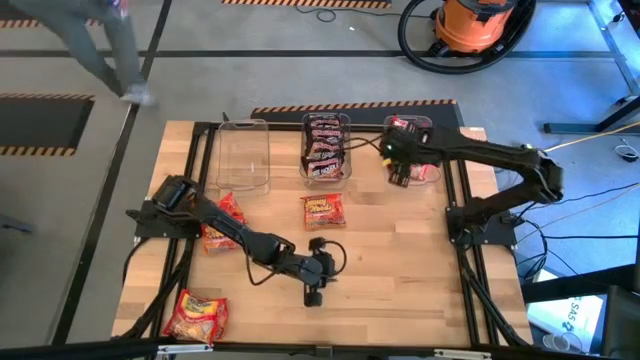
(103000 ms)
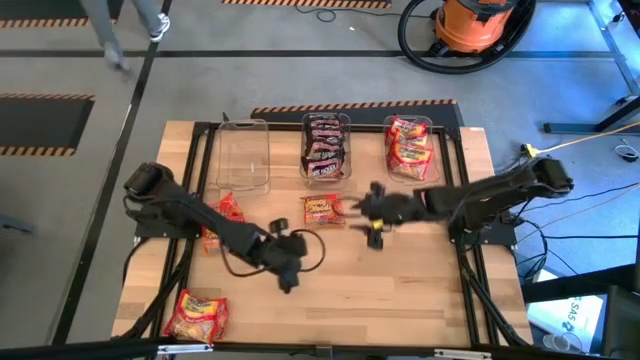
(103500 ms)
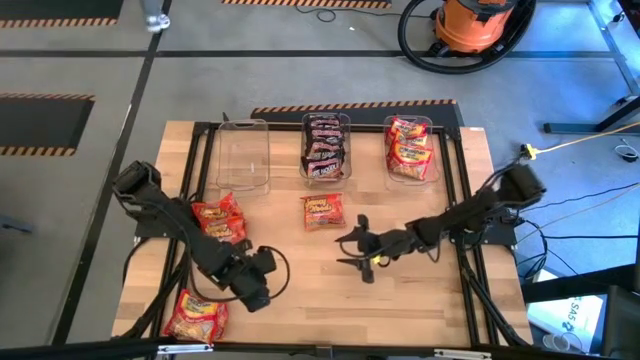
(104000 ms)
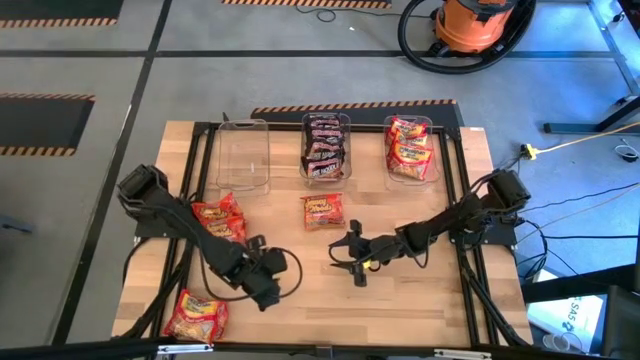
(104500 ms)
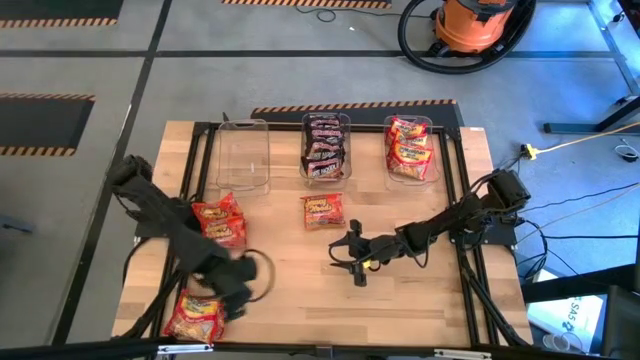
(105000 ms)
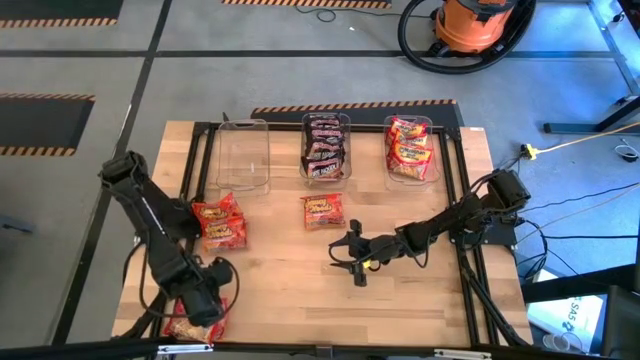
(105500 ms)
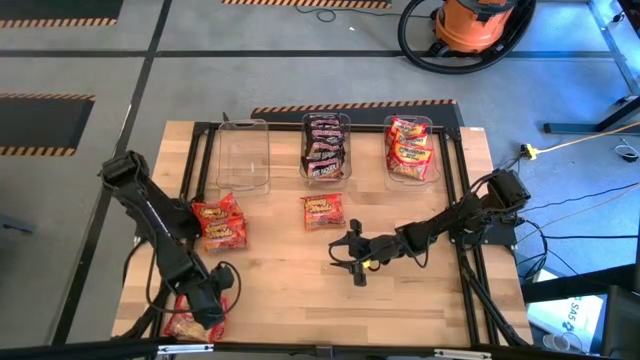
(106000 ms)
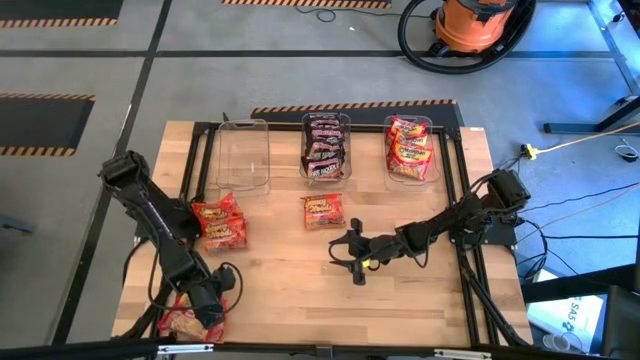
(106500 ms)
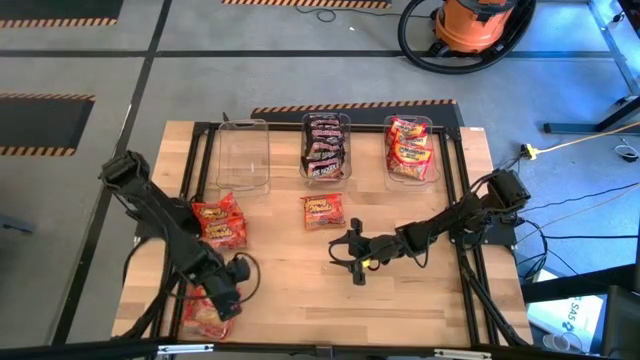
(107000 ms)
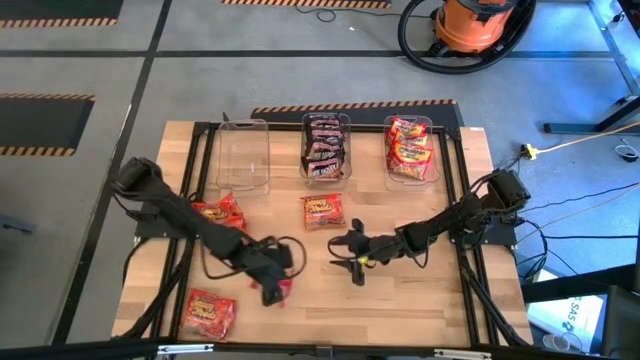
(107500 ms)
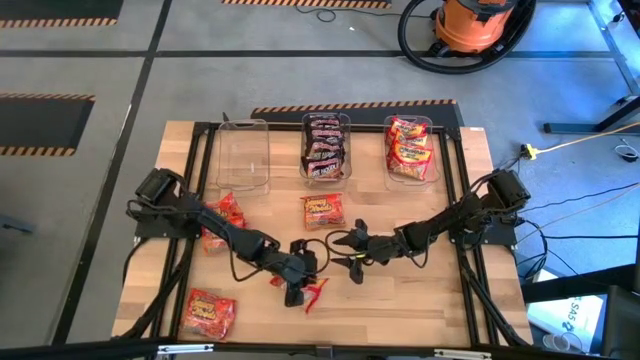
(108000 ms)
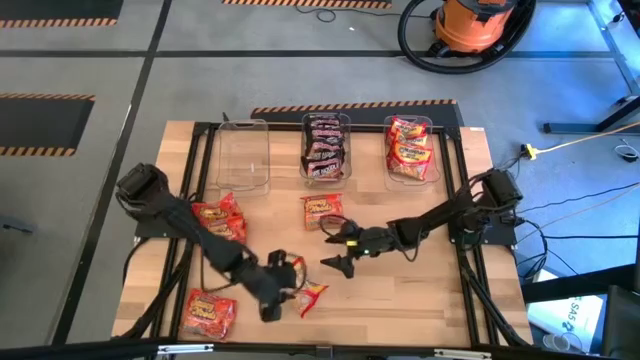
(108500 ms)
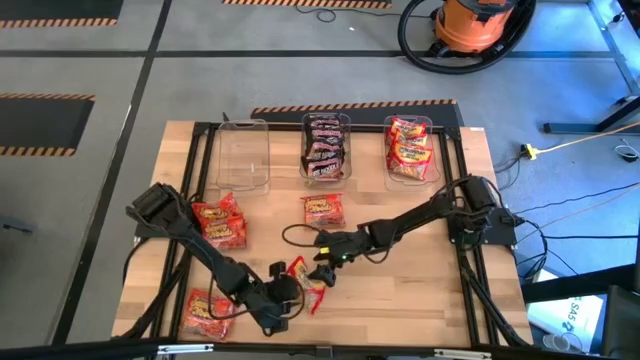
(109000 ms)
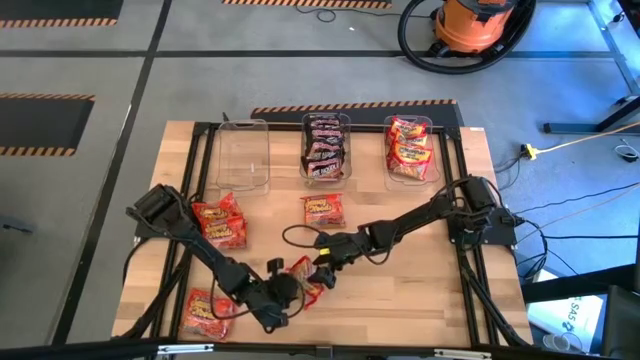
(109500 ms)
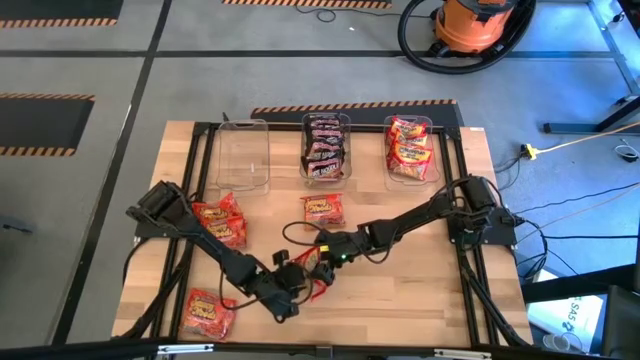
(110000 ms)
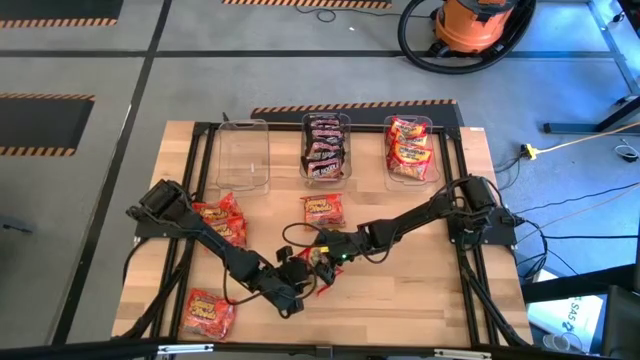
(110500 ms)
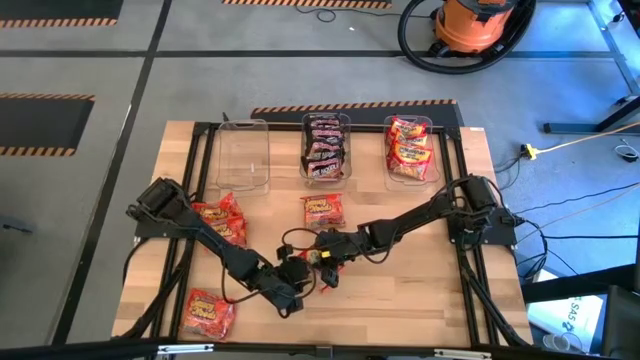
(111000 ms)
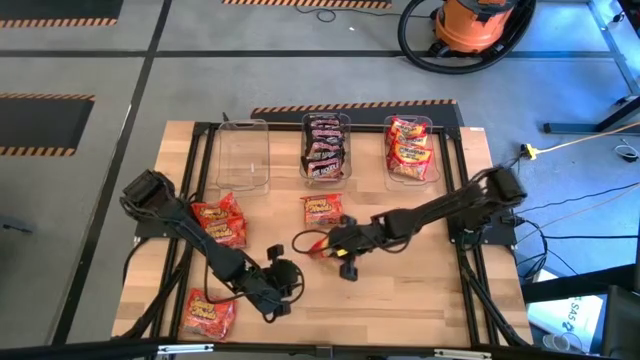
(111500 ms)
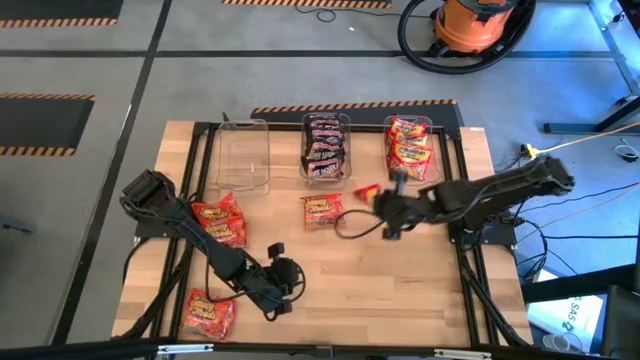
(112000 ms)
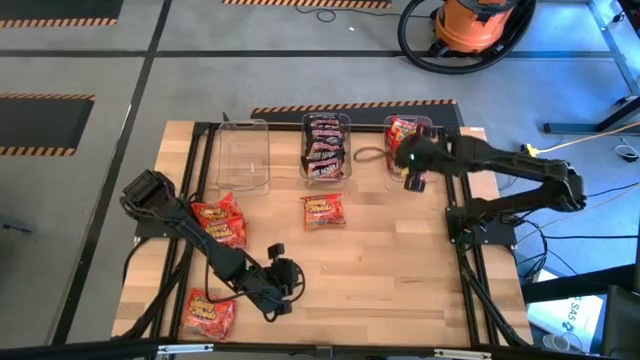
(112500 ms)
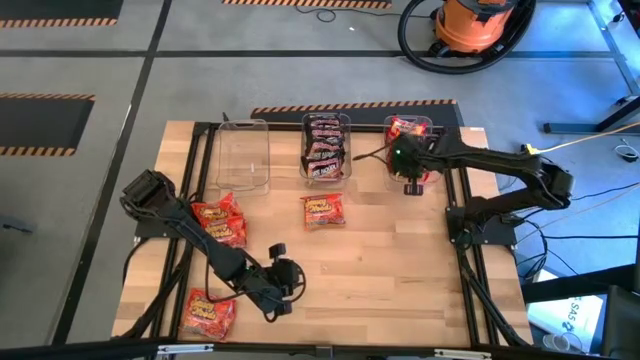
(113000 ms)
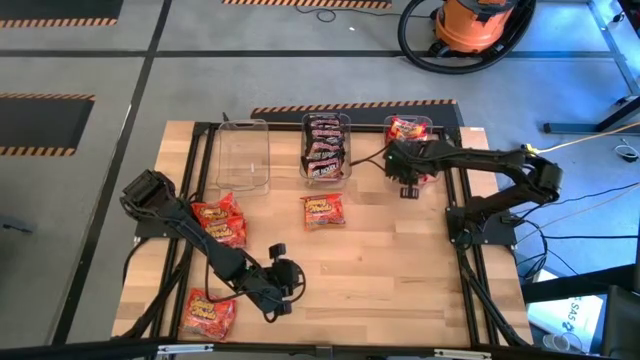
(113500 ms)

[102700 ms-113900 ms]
Task: Sort Maruchan noodles
Put the red noodle pack into the right transparent bin

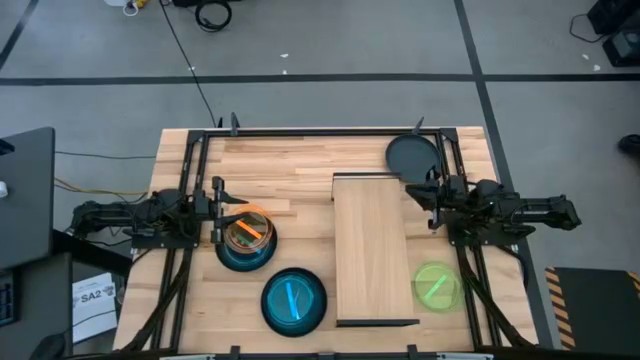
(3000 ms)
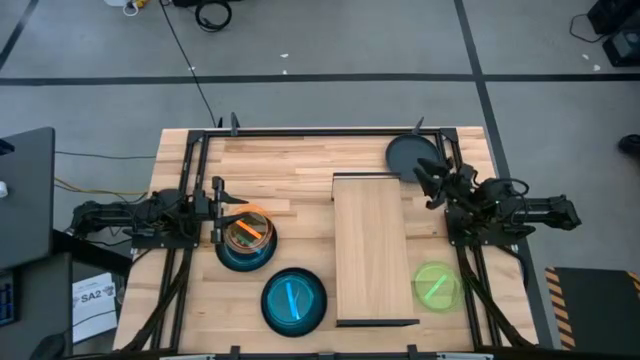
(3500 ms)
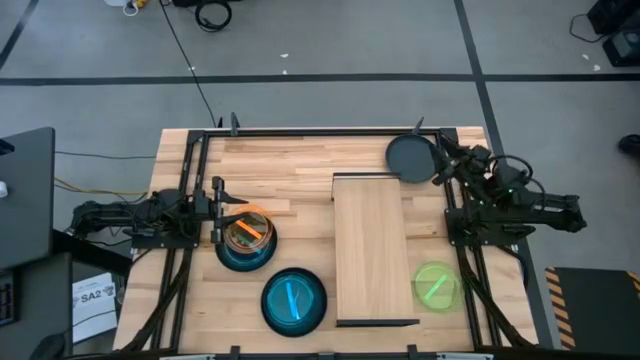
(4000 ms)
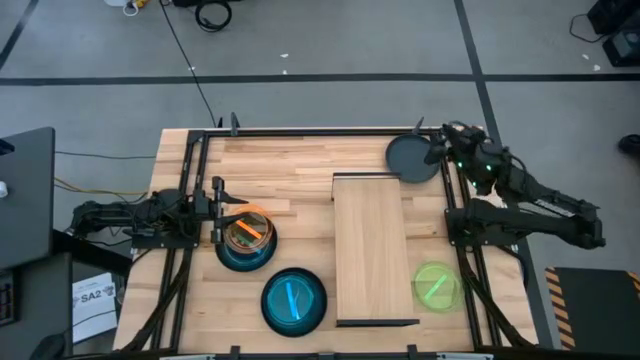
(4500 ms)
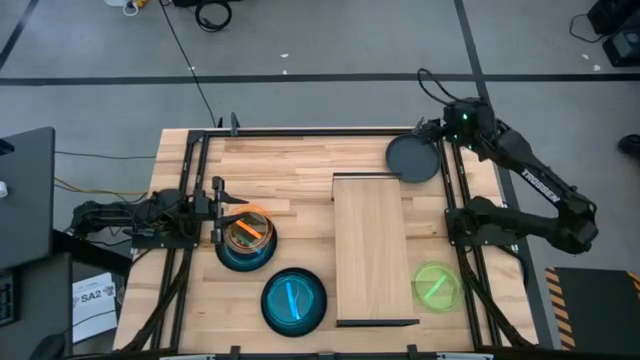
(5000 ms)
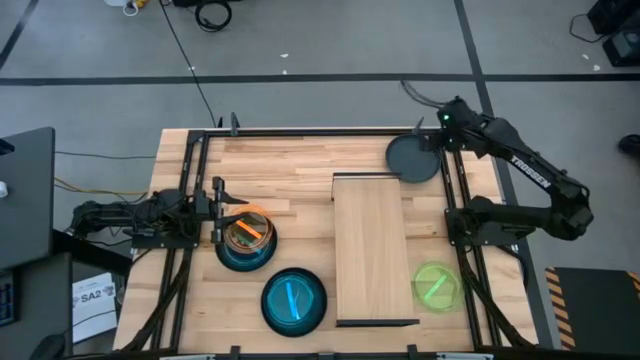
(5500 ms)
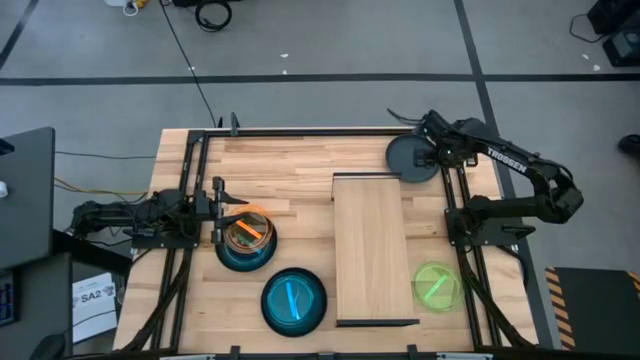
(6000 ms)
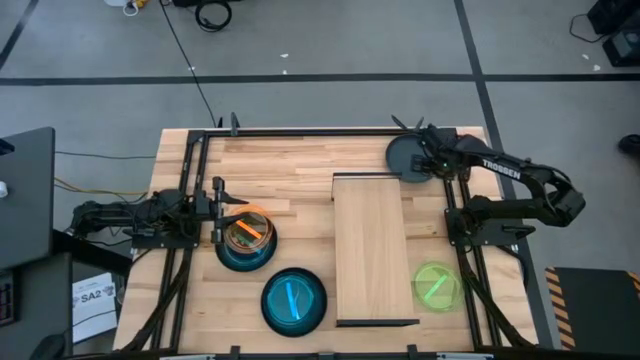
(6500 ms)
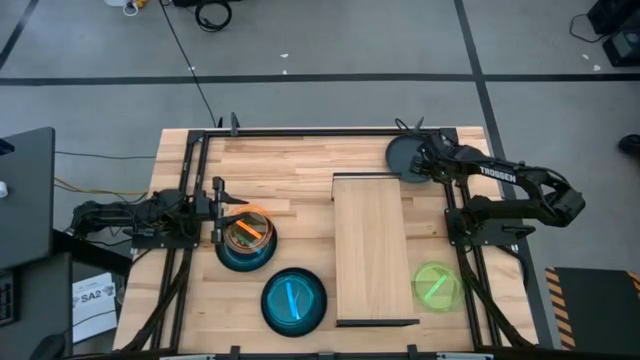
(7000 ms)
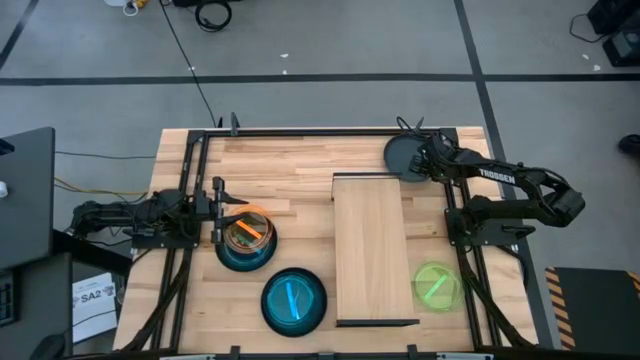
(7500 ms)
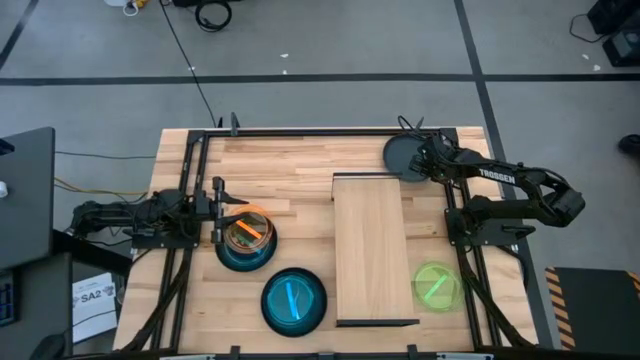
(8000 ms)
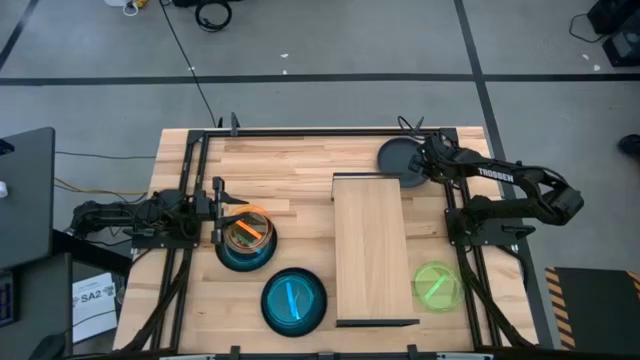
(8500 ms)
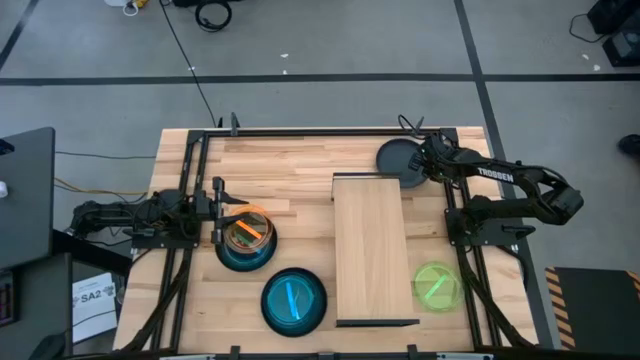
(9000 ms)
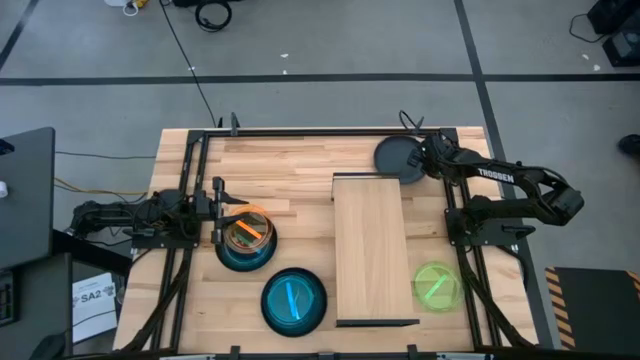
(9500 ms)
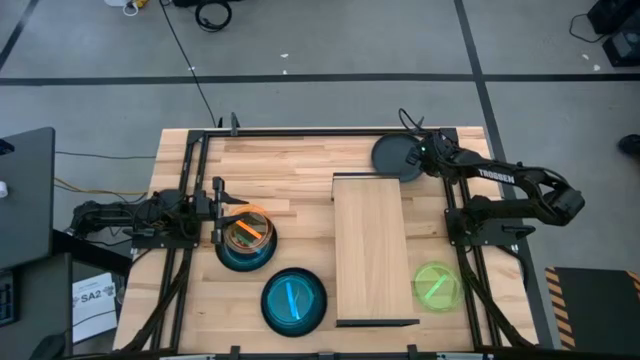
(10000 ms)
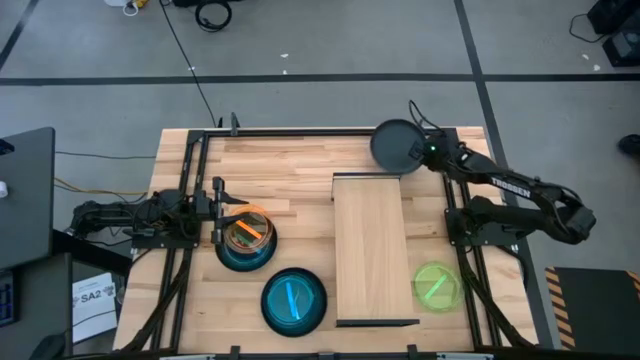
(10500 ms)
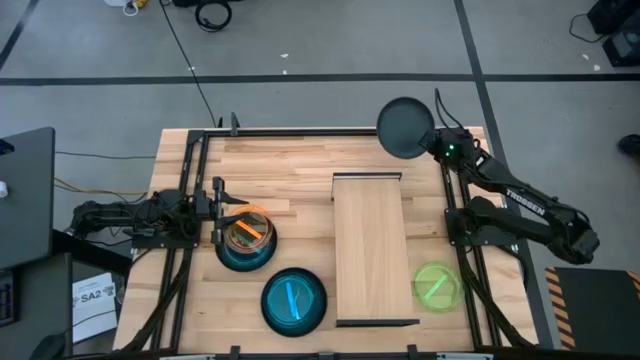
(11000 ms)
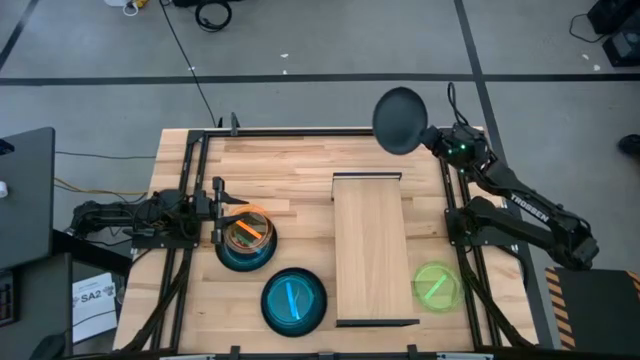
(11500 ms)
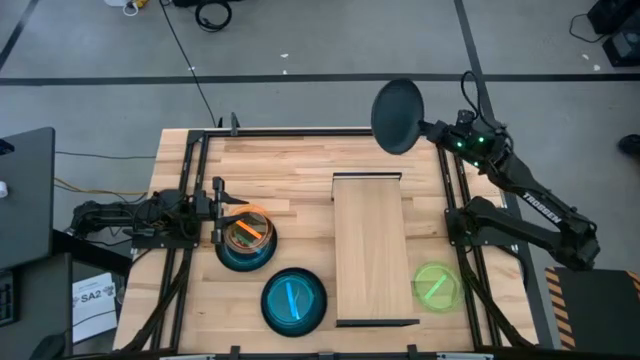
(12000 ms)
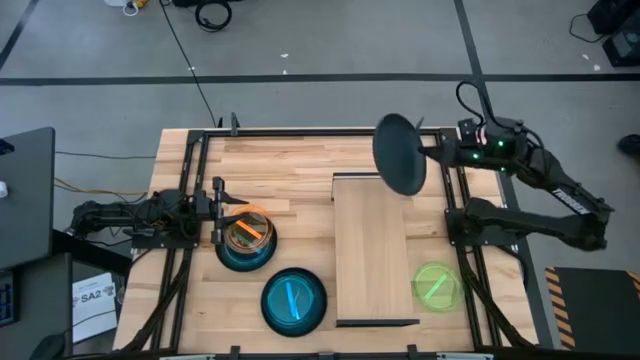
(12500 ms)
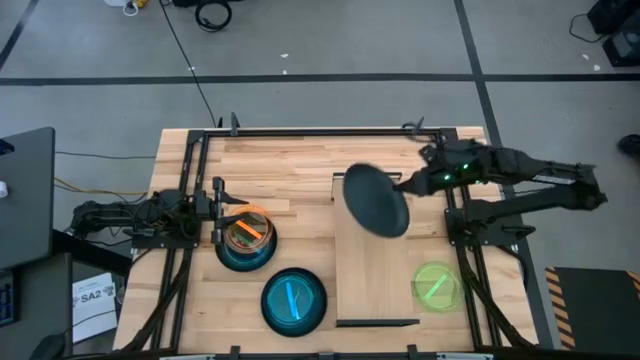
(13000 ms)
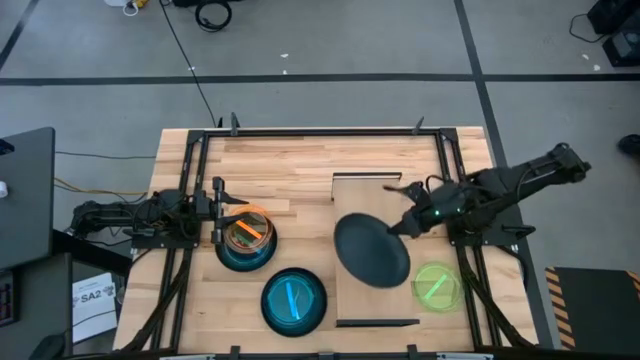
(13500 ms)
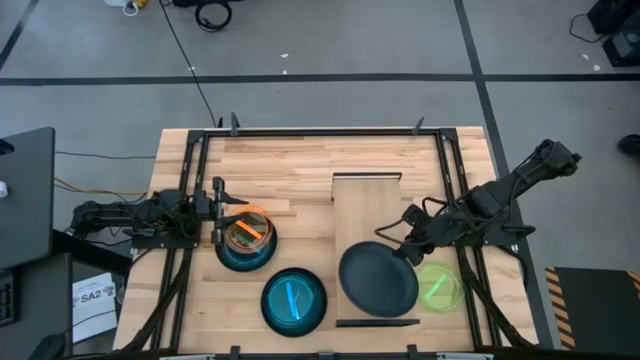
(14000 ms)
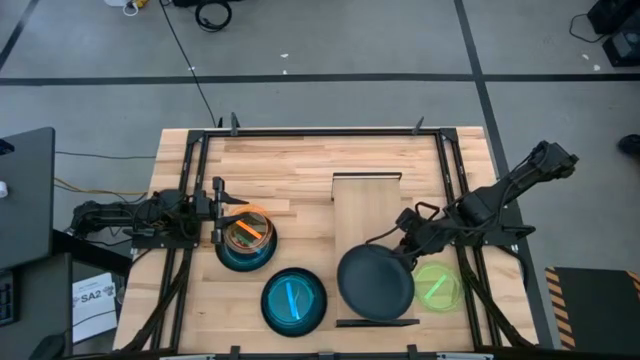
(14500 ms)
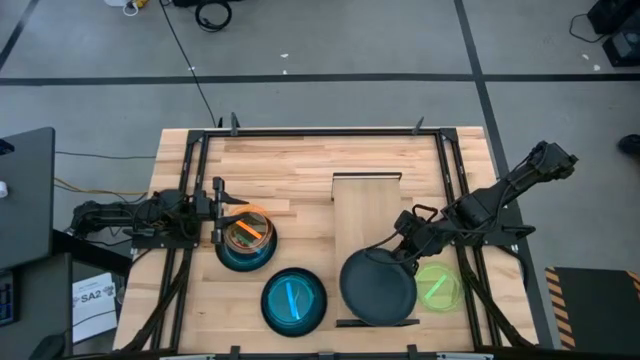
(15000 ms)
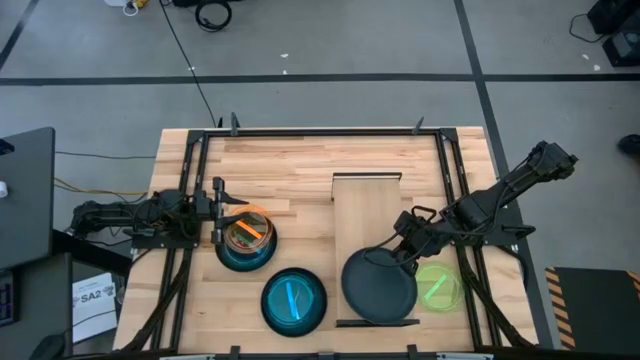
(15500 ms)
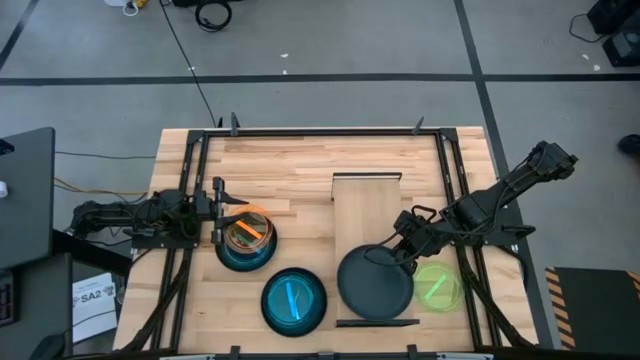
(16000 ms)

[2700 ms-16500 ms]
Task: Place and stack plates onto a shelf
Put the top right black plate on the shelf
